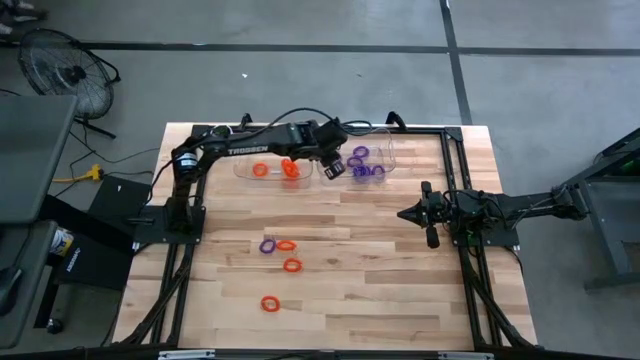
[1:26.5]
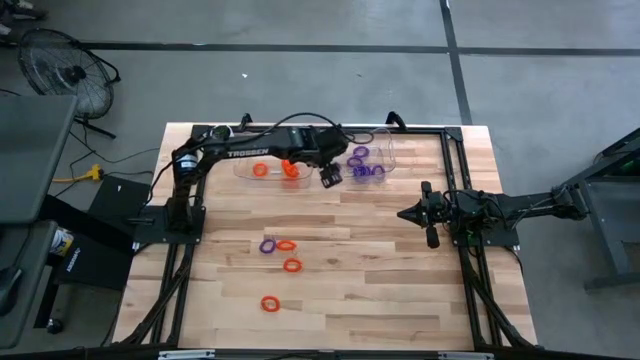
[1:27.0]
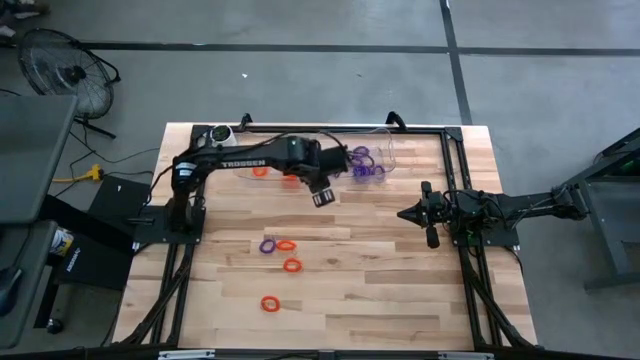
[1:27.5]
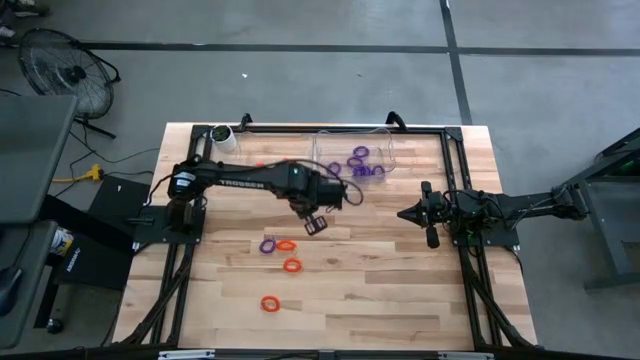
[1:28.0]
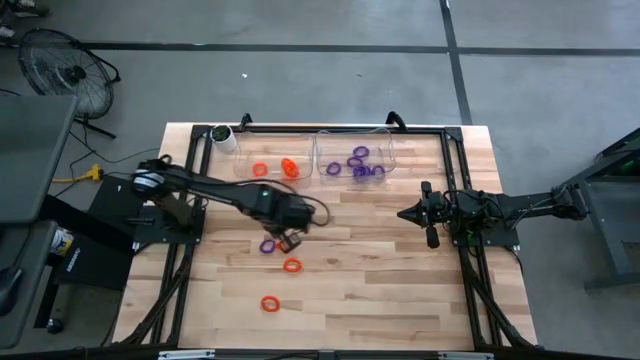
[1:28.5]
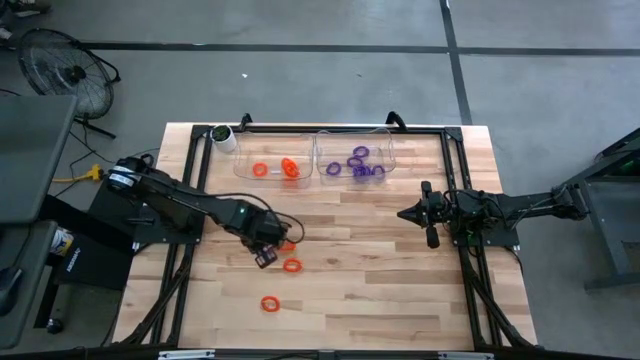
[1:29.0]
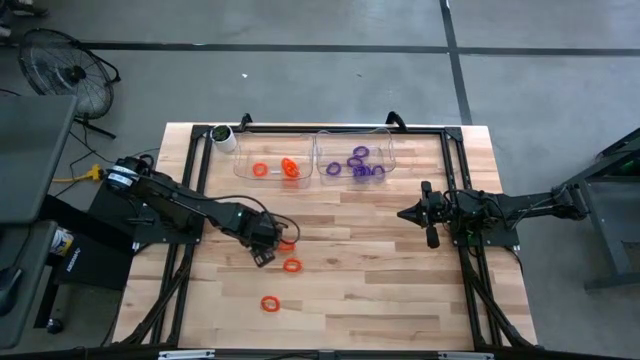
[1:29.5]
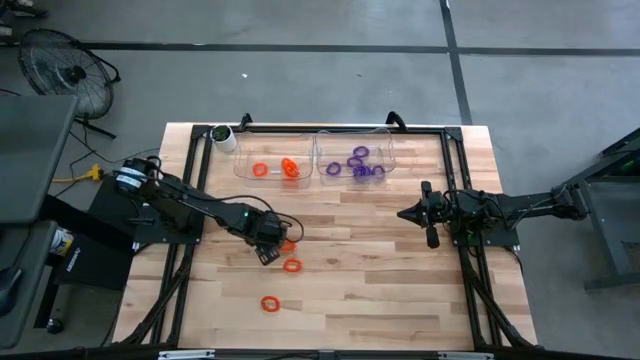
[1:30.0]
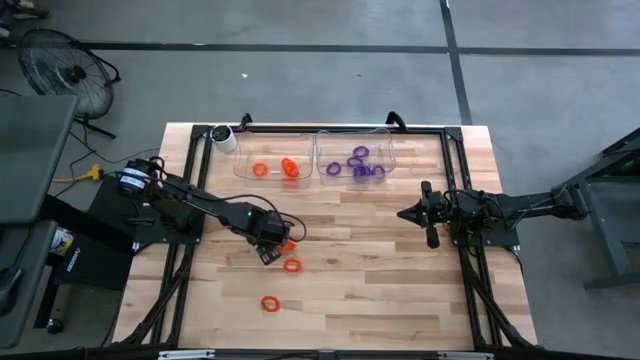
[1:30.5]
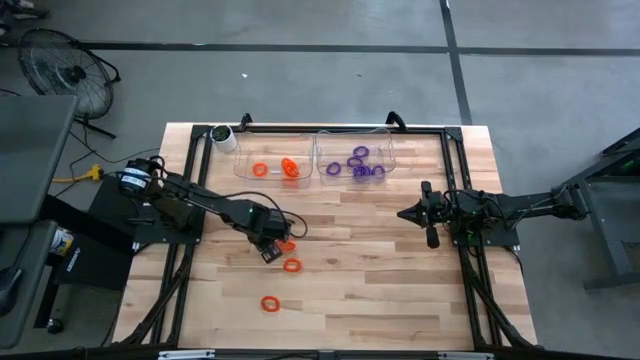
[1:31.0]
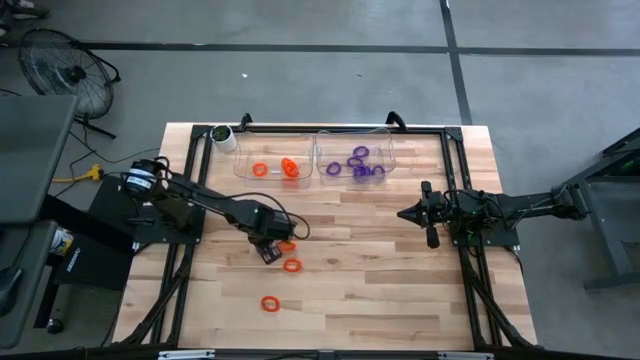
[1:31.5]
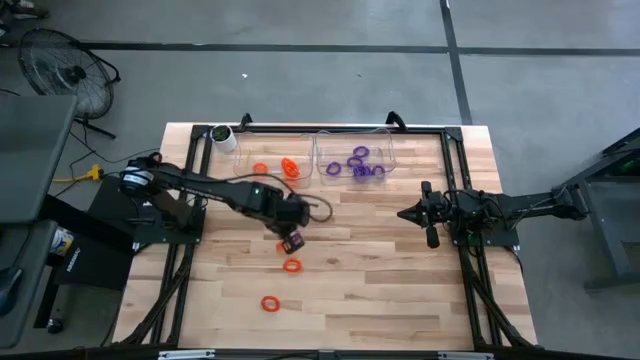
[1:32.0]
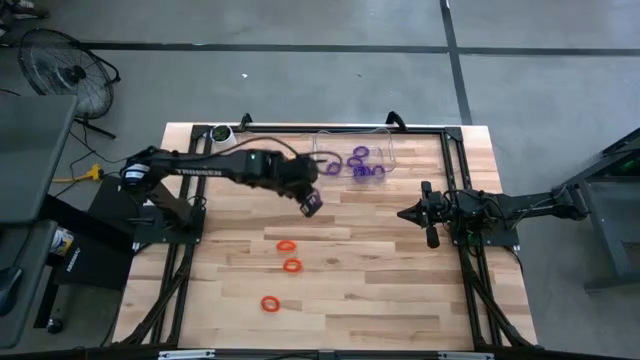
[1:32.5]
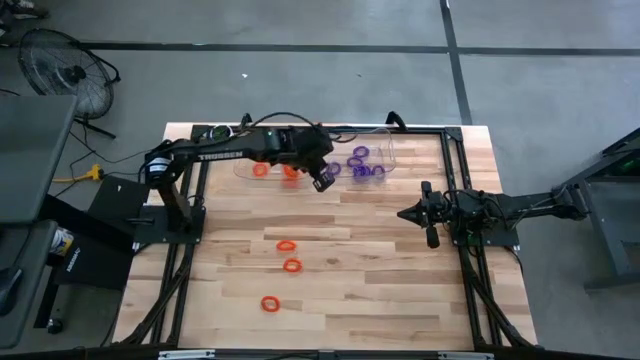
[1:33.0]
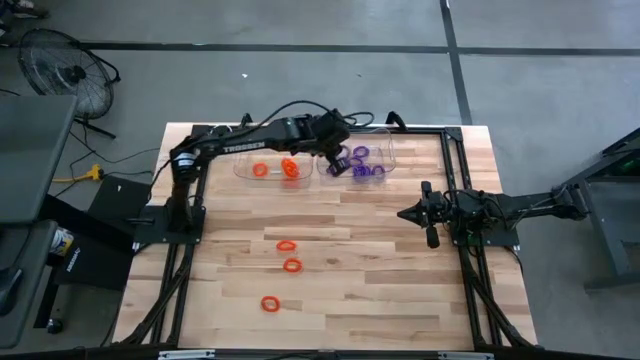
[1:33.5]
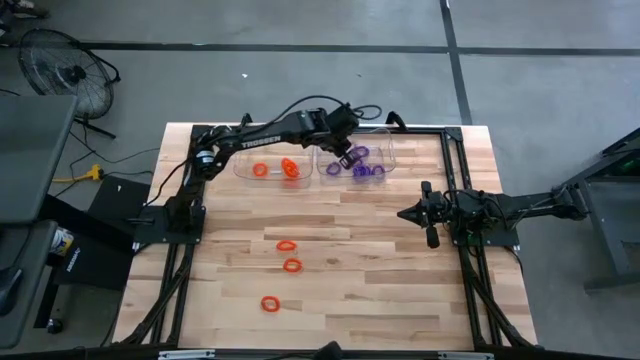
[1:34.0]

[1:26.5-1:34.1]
Task: Sort spring keychains
Put the violet spring keychain into the right bin

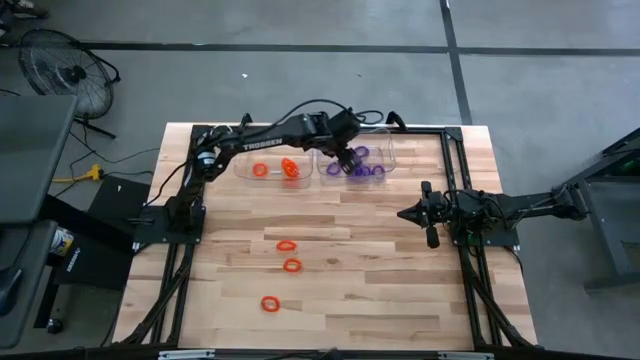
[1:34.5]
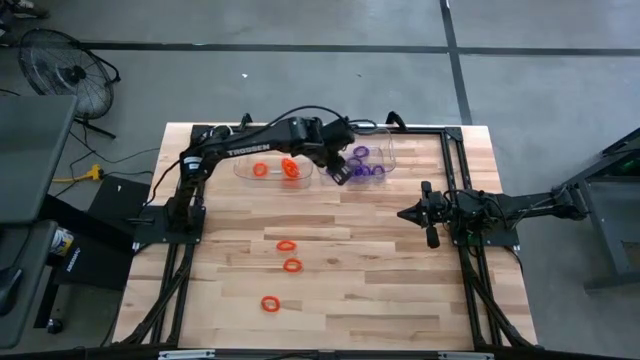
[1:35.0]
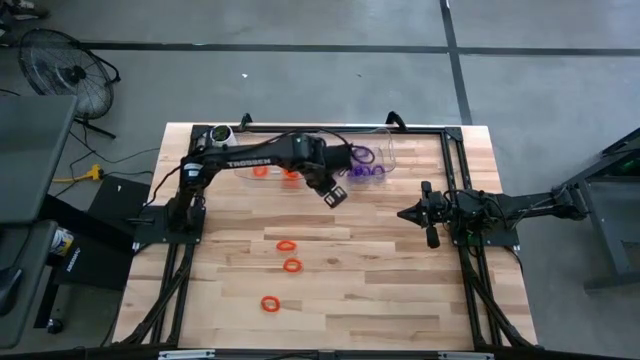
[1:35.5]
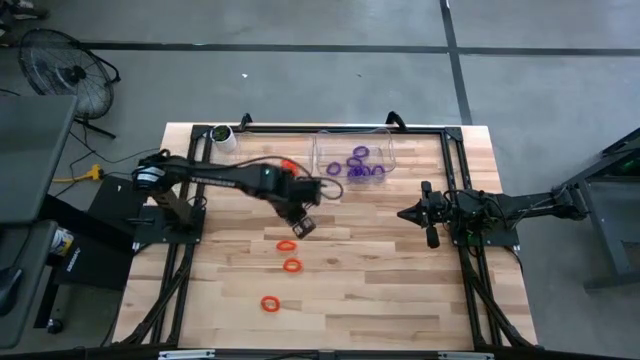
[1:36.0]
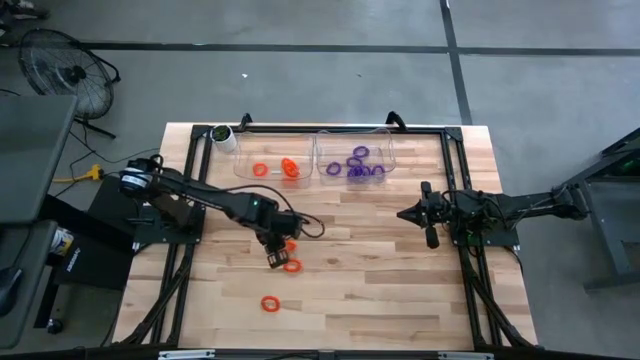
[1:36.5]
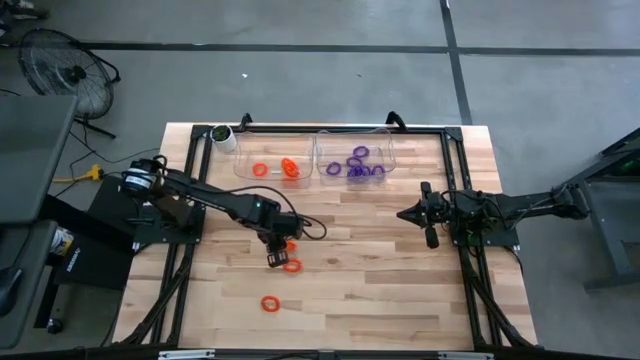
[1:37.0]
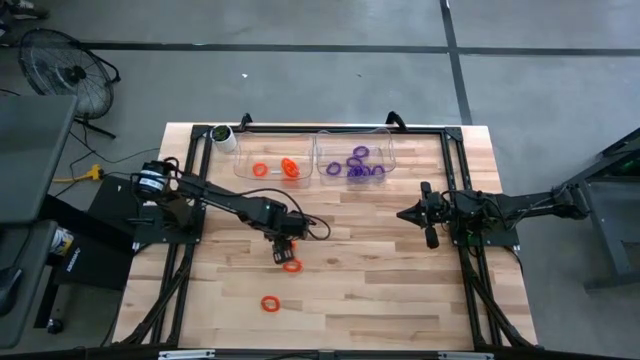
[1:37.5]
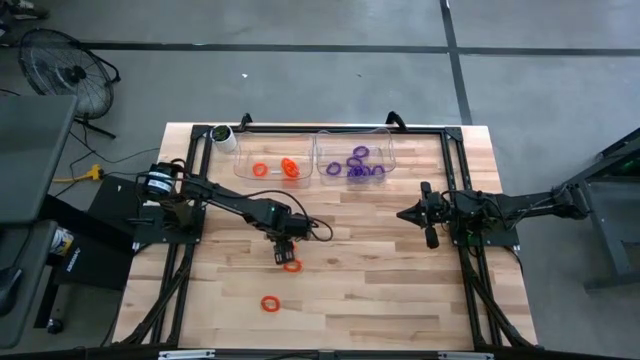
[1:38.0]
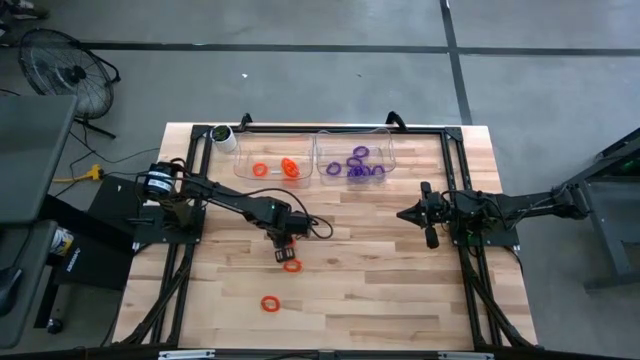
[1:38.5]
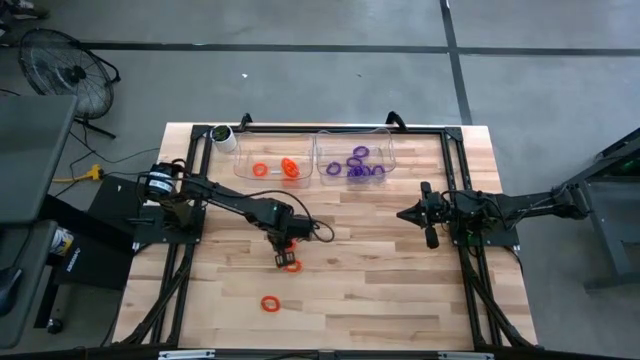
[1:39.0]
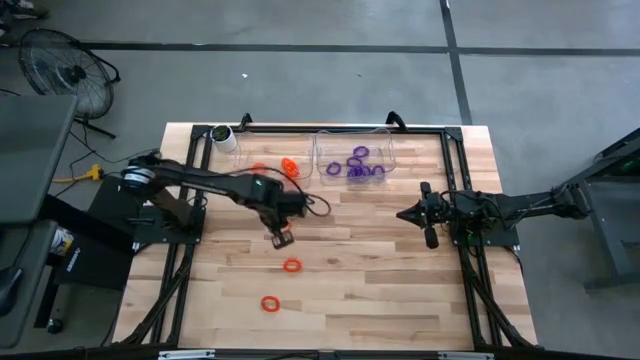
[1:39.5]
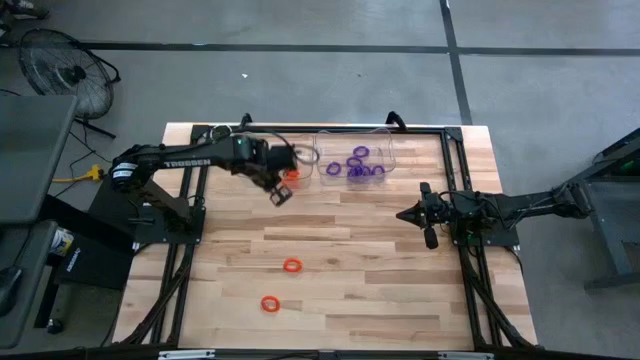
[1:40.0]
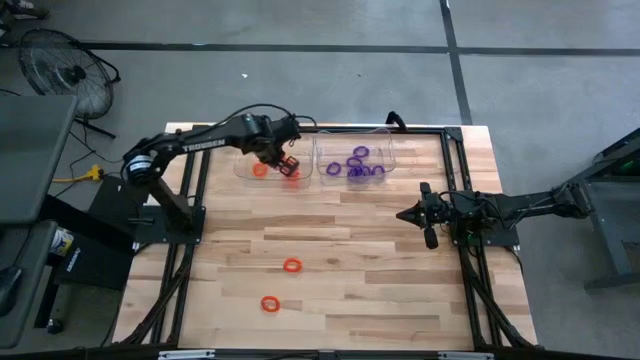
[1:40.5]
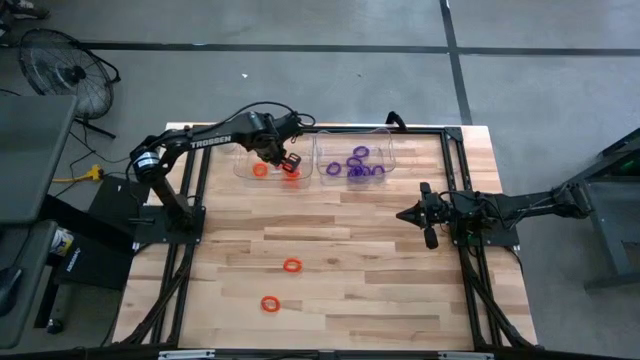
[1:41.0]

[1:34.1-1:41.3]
Put the top orange spring keychain into the left bin

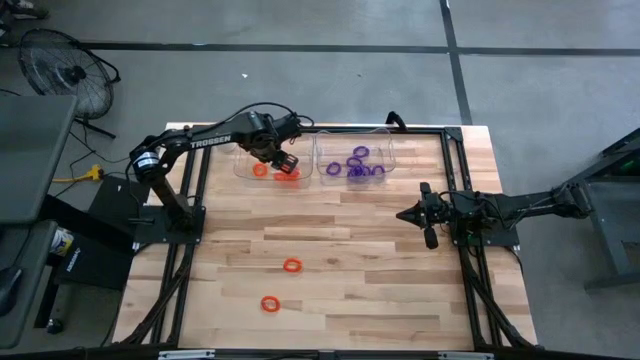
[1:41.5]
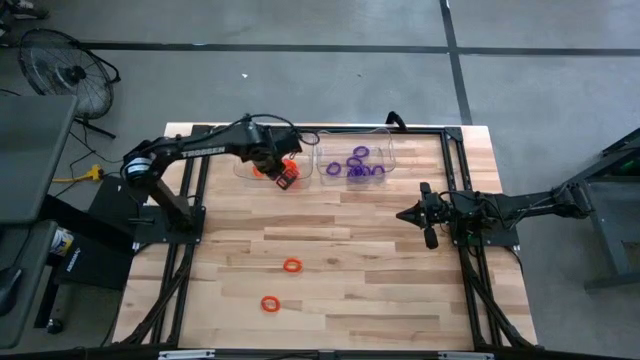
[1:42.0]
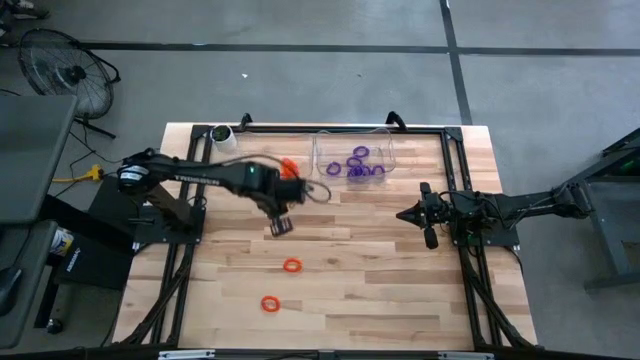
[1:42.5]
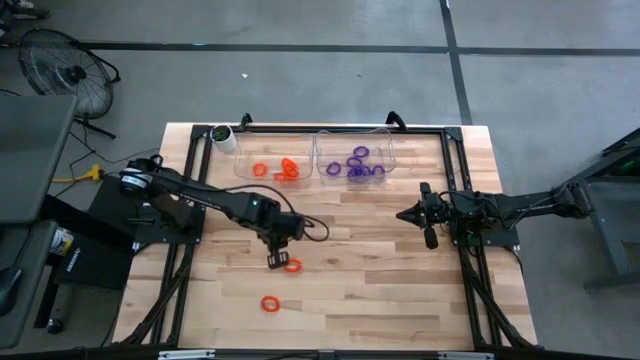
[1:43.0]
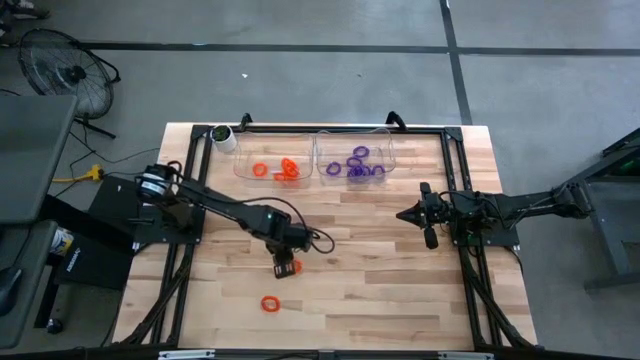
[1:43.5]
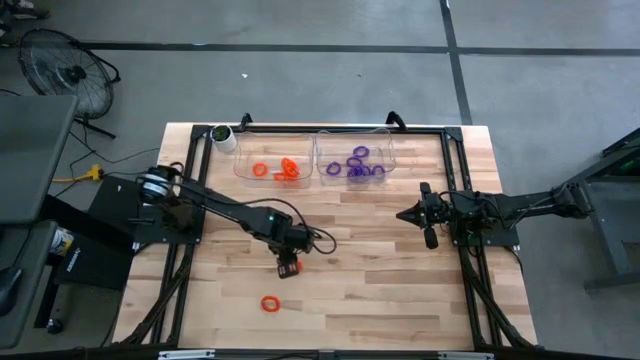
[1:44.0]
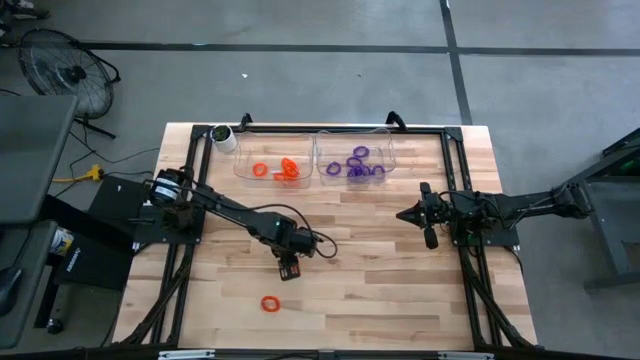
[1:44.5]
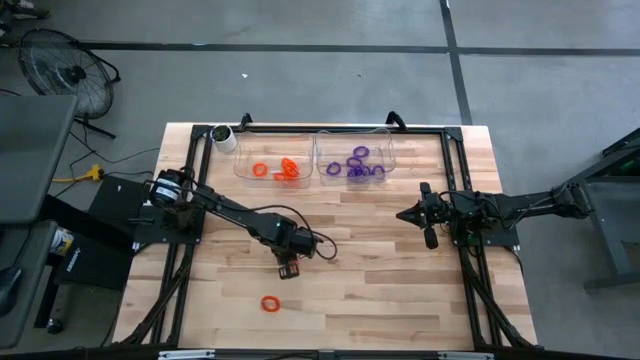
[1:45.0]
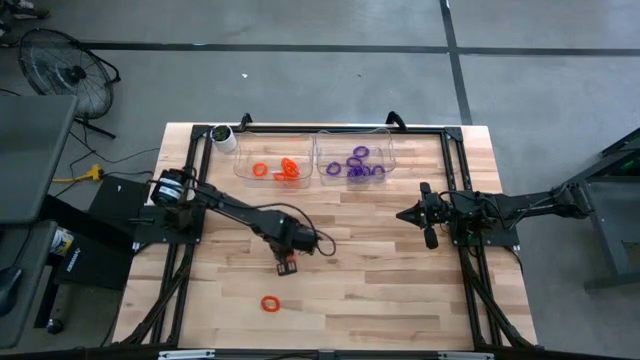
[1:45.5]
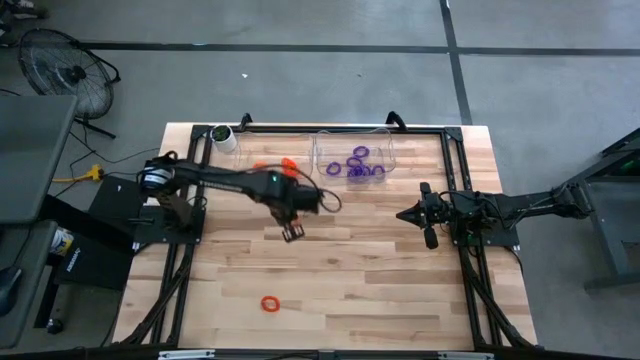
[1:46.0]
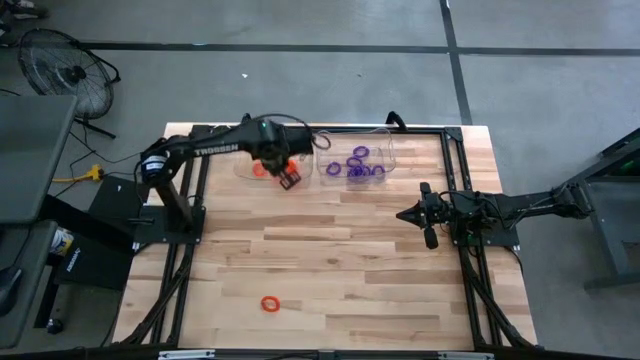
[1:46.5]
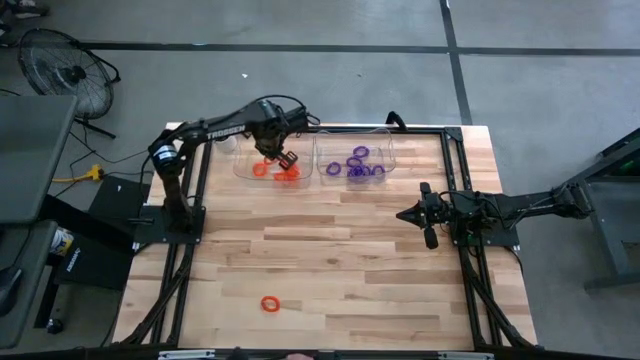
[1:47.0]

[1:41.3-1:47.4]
Put the top orange spring keychain into the left bin
